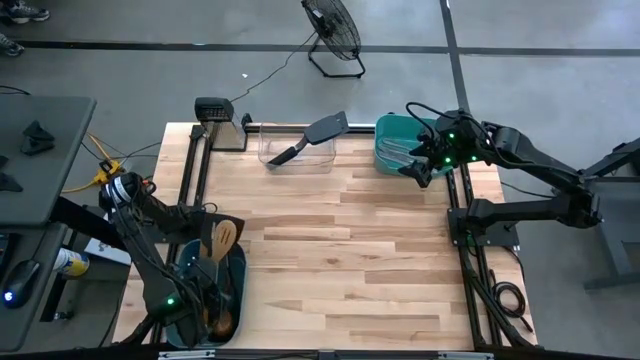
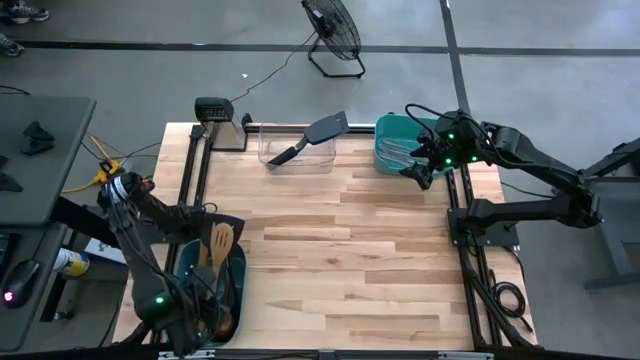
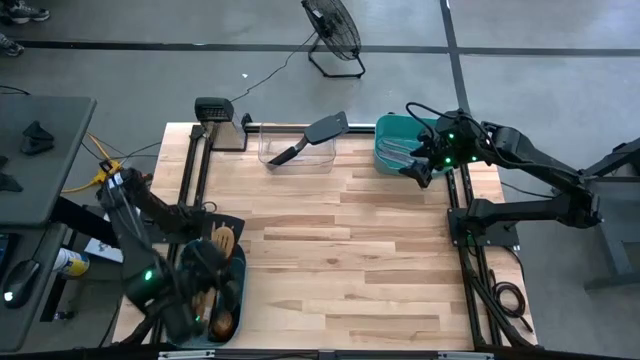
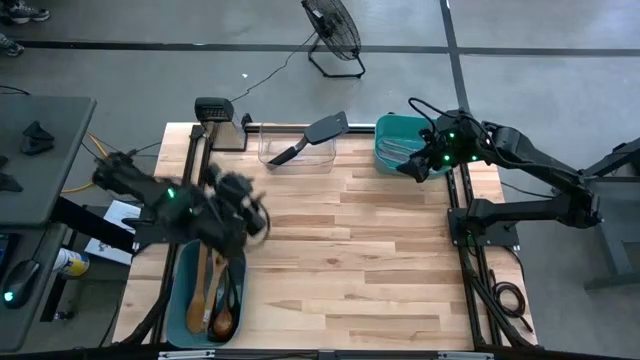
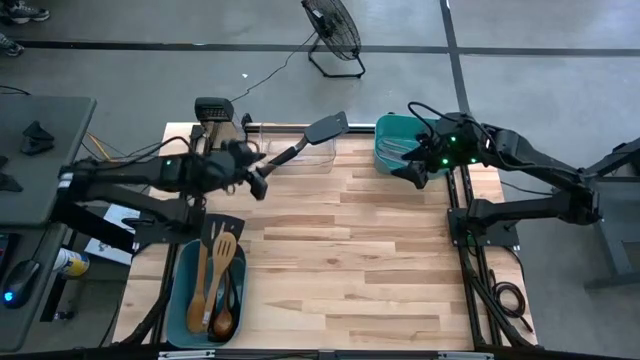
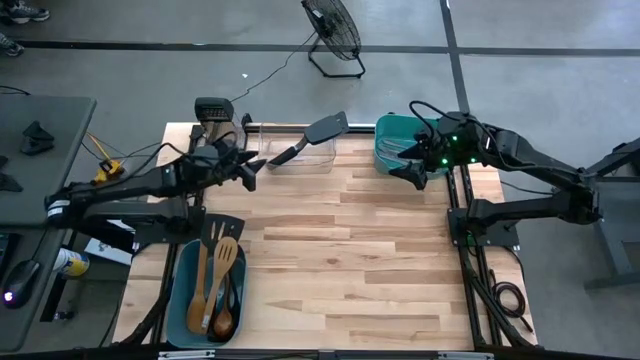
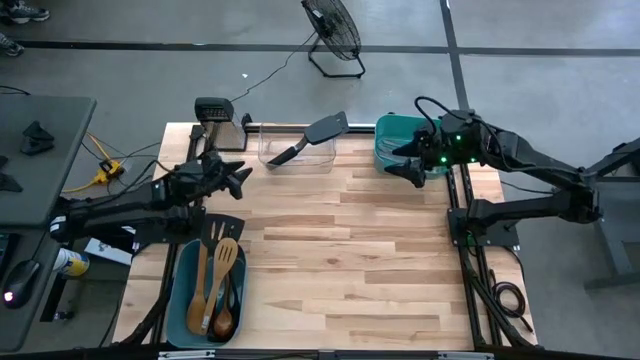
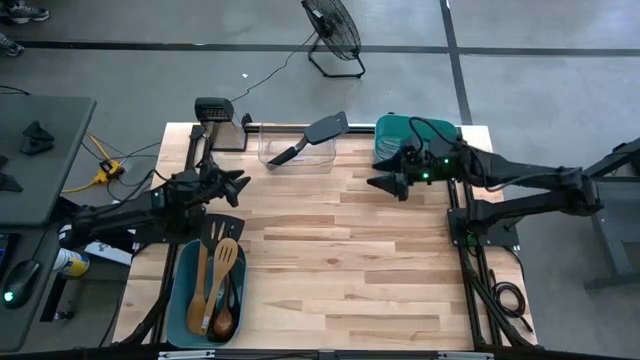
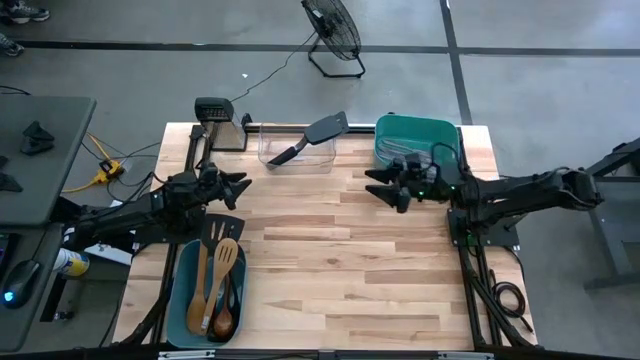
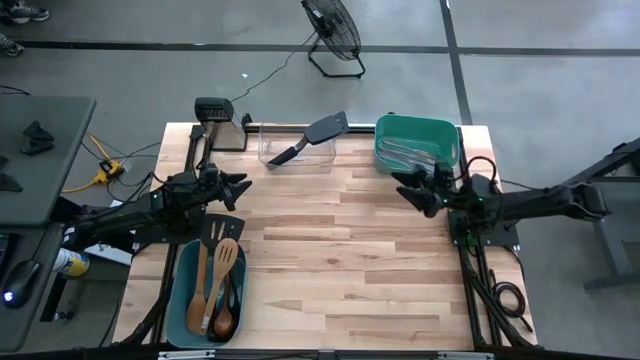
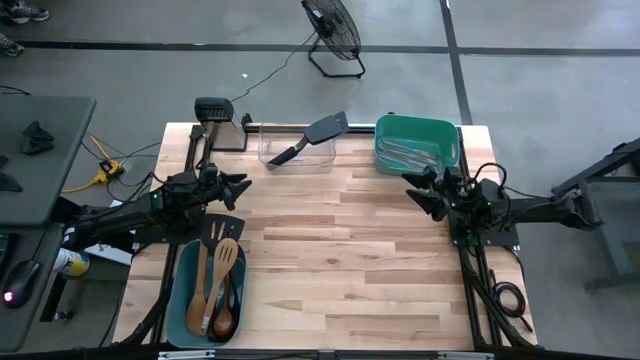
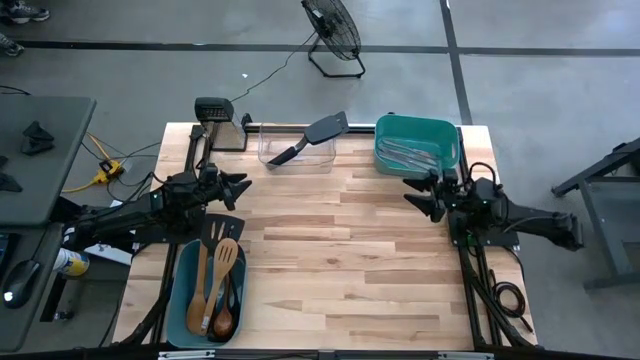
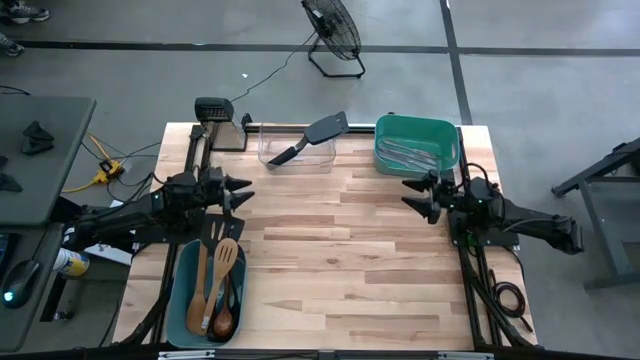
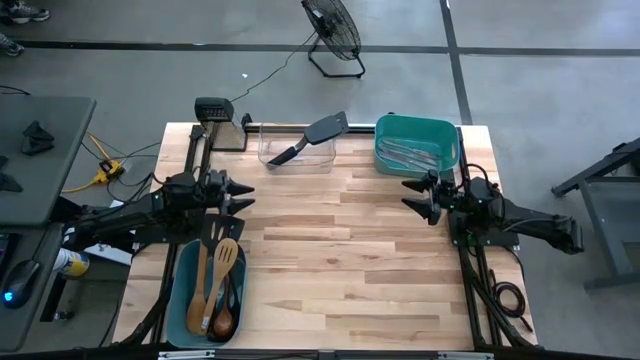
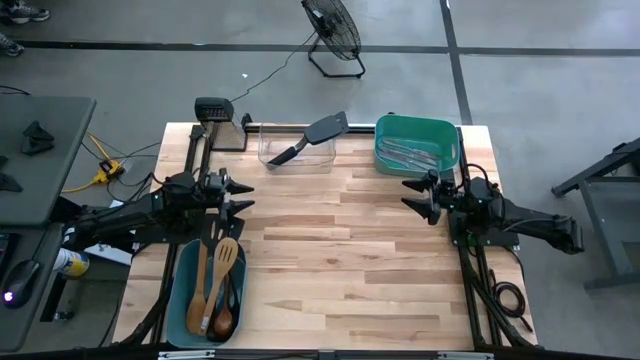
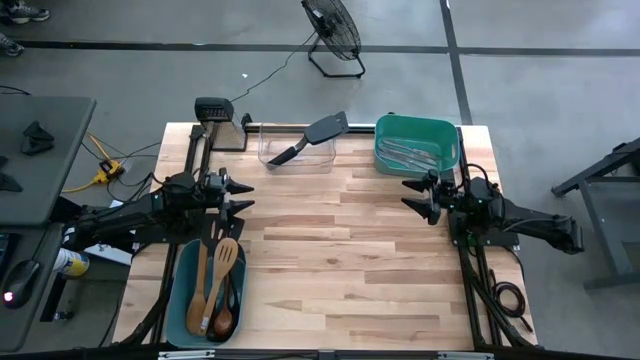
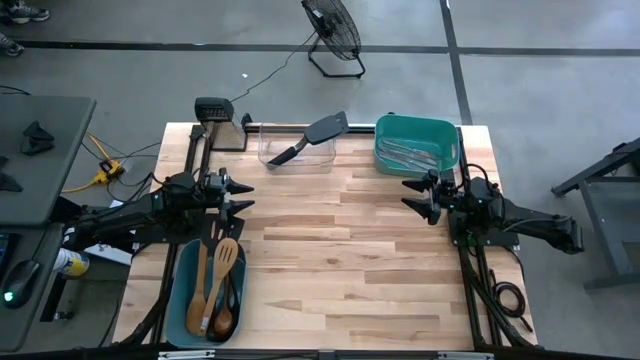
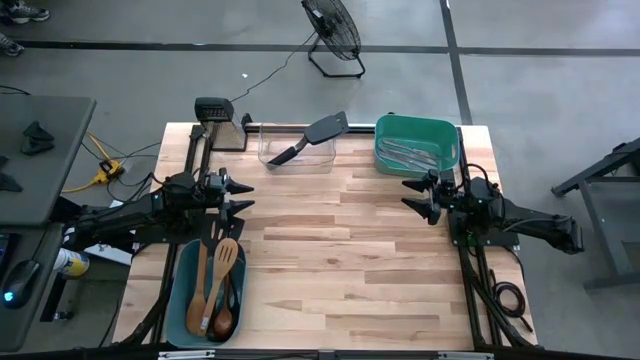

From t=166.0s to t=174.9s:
Task: Pick & Place Kitchen Items
Return to Home Position

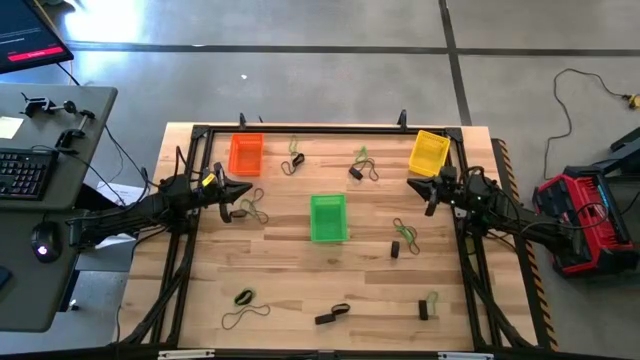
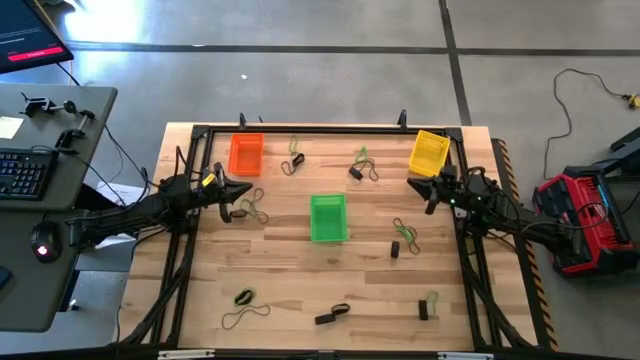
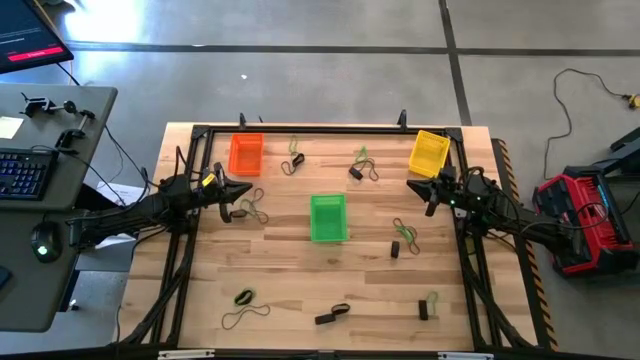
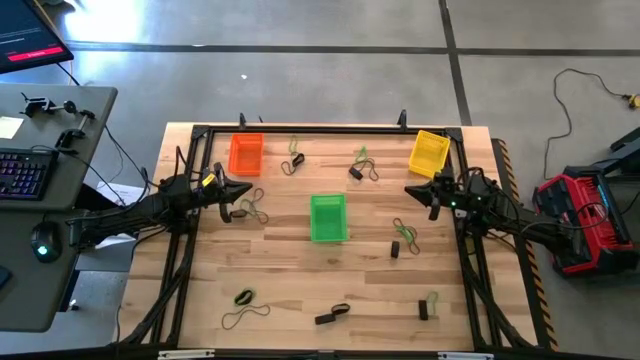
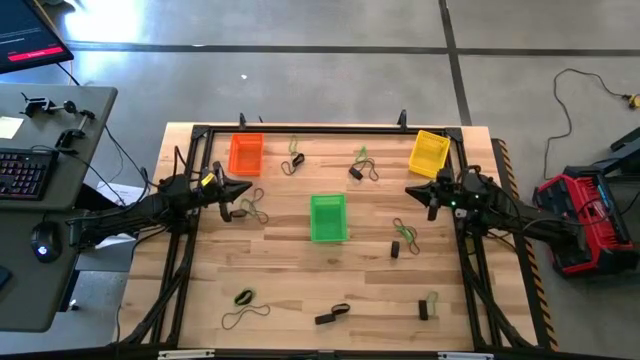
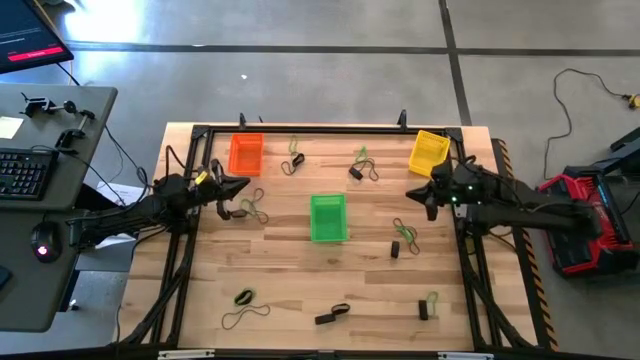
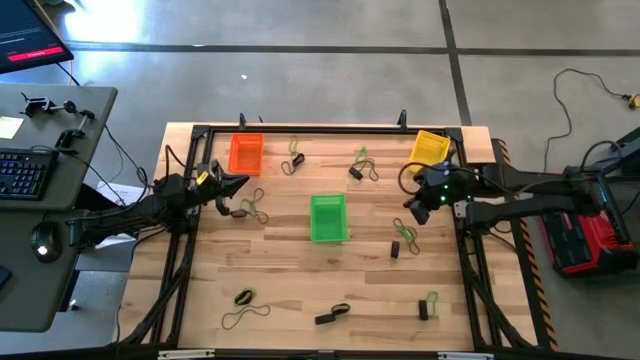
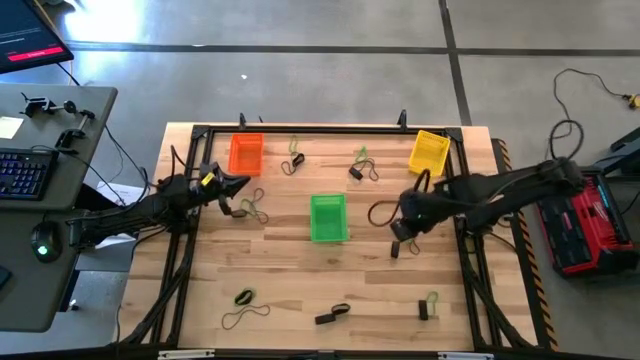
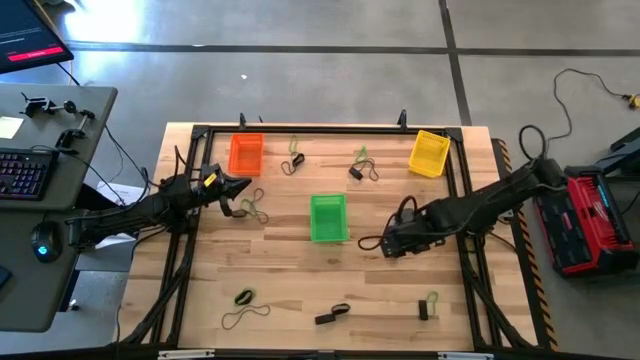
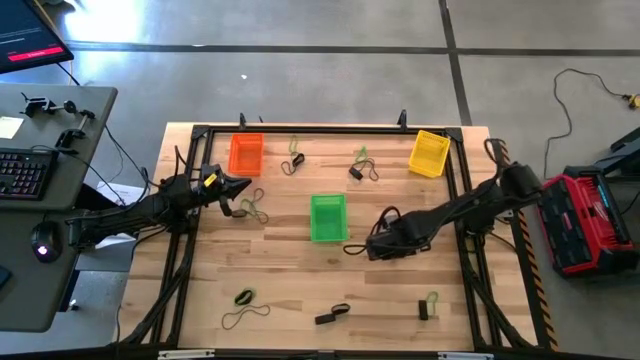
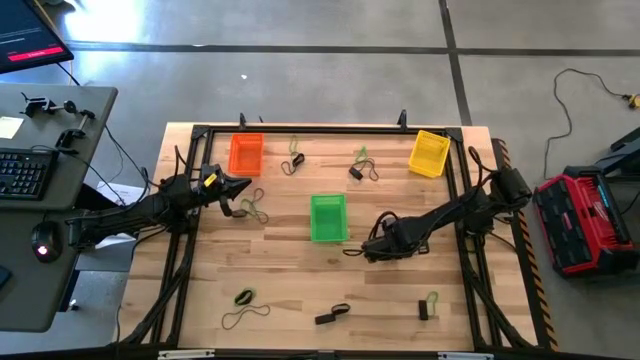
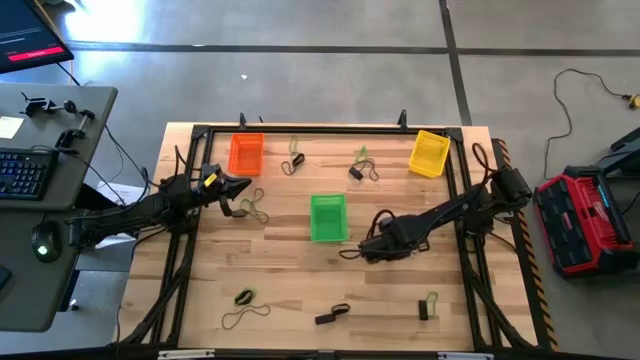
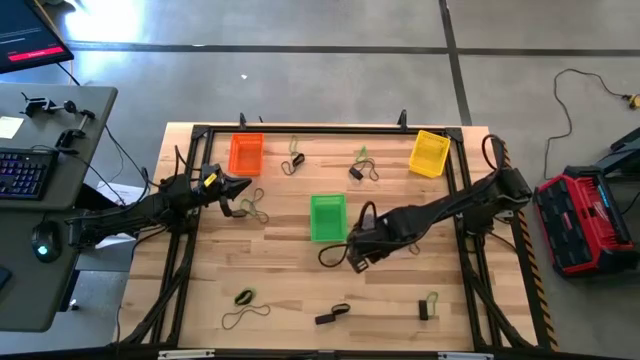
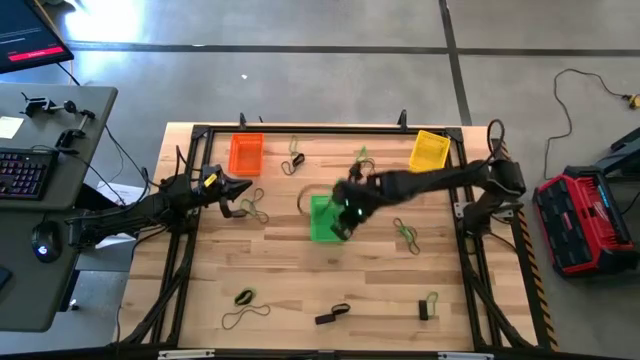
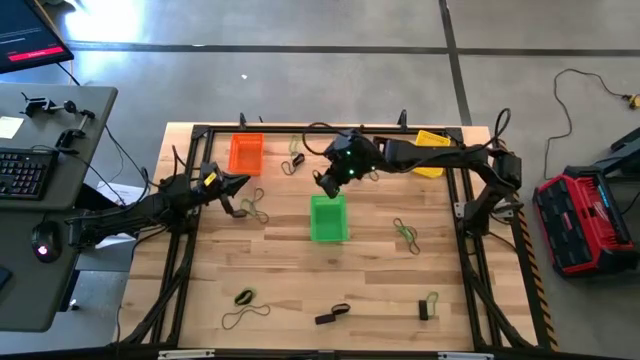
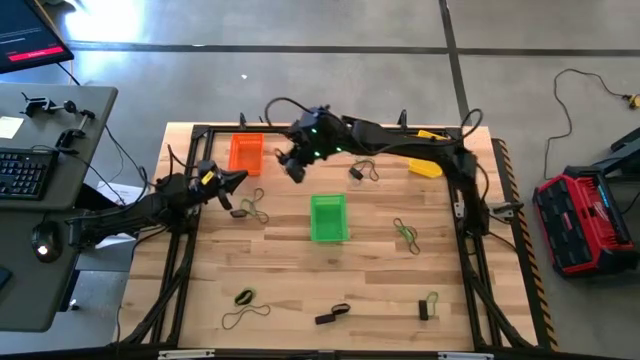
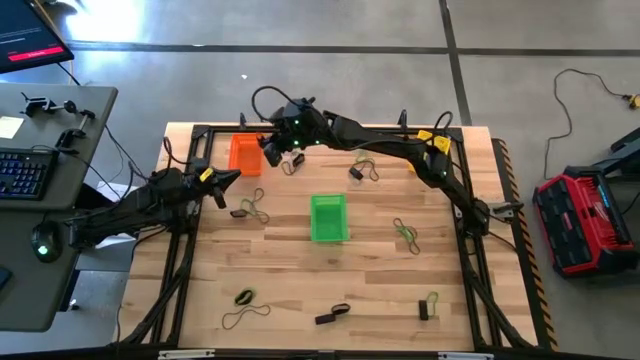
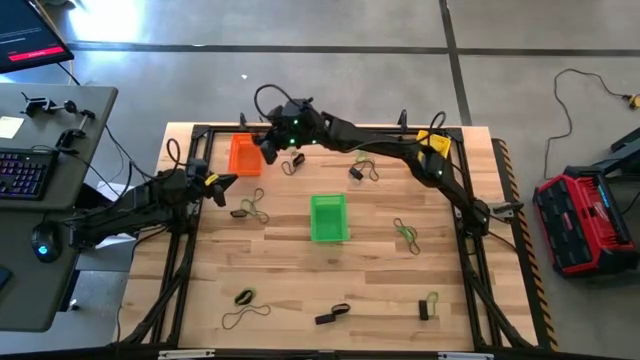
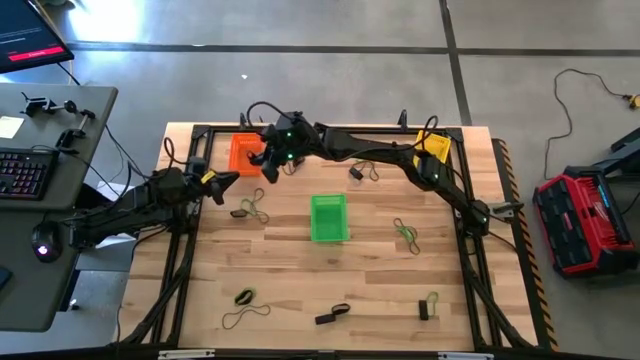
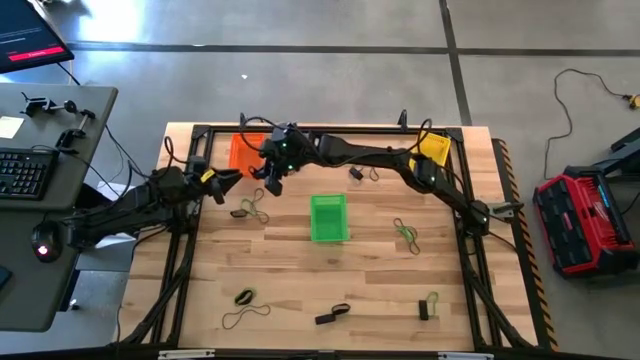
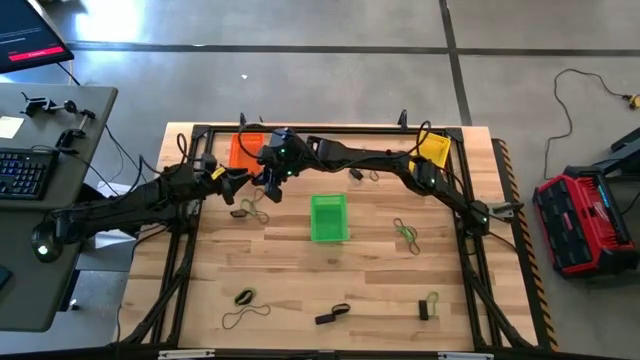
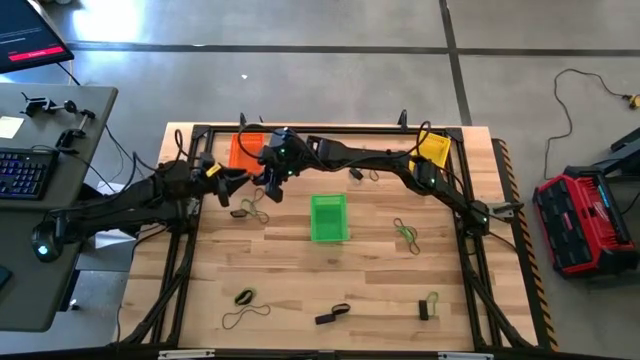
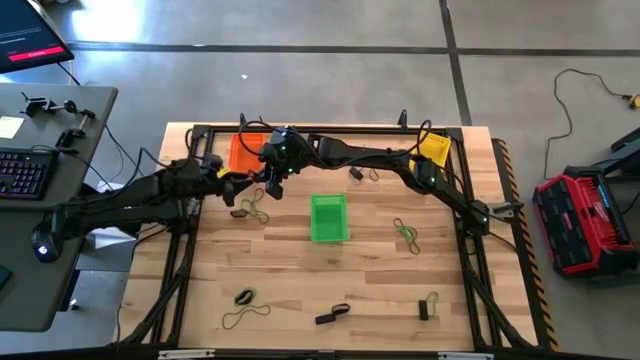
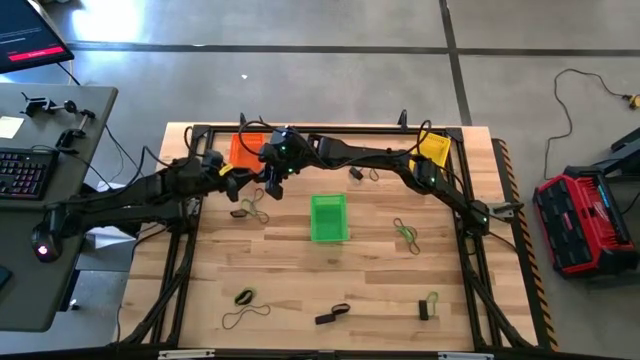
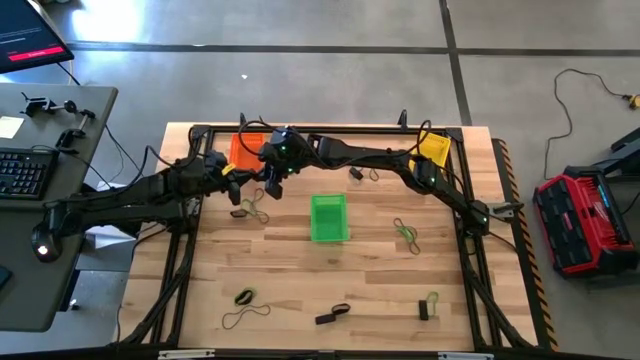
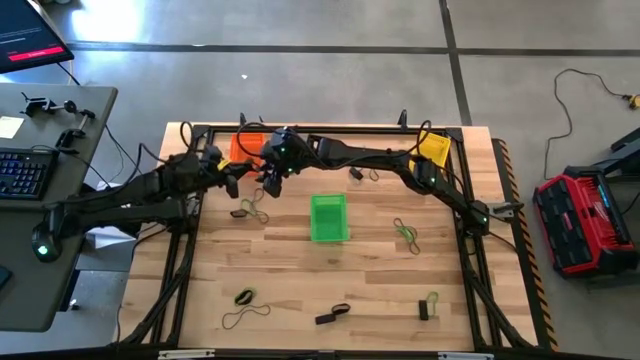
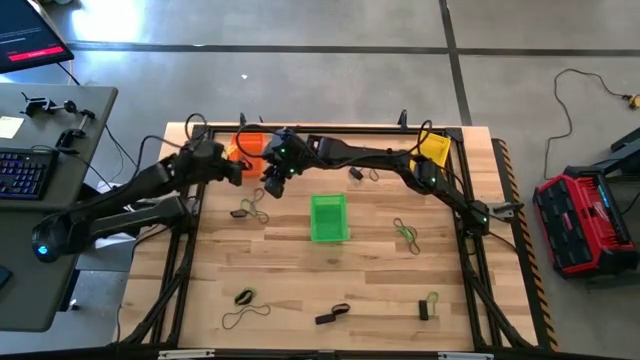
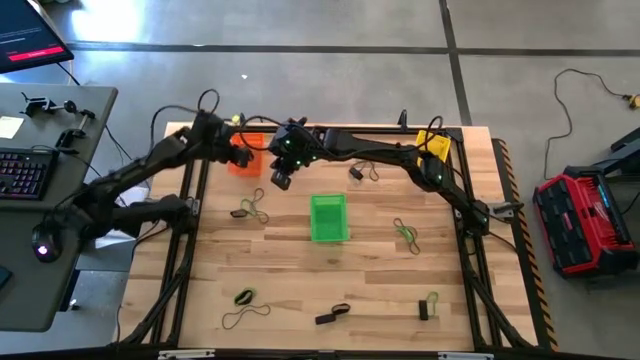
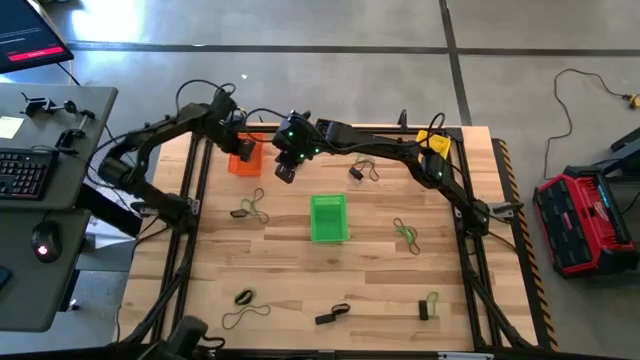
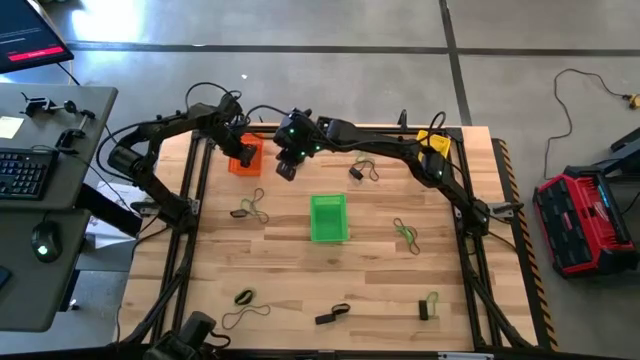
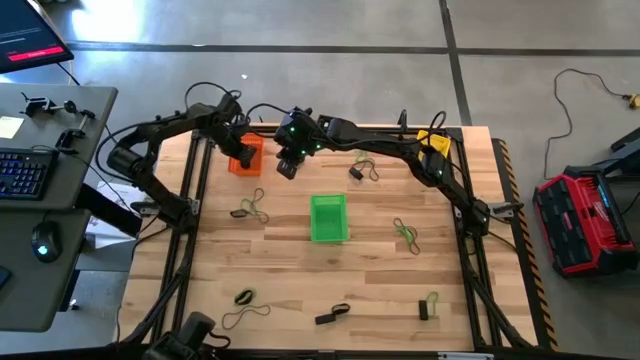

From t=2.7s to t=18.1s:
Task: Sort rubber bands into baskets
Put the black rubber band into the orange bin
